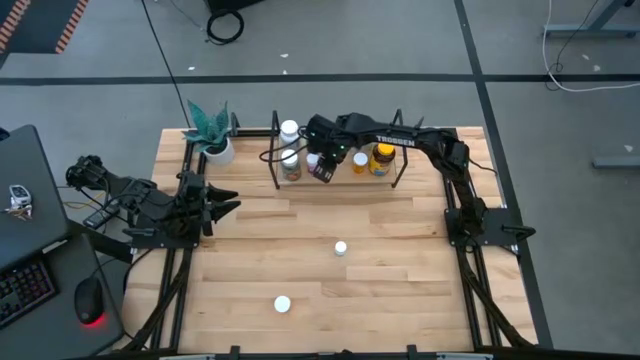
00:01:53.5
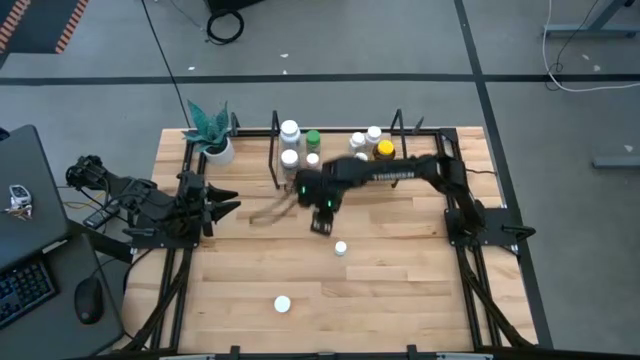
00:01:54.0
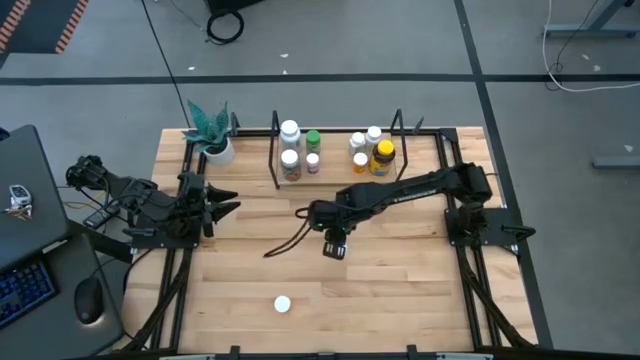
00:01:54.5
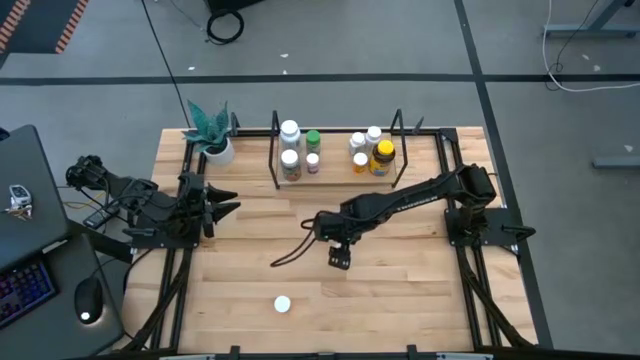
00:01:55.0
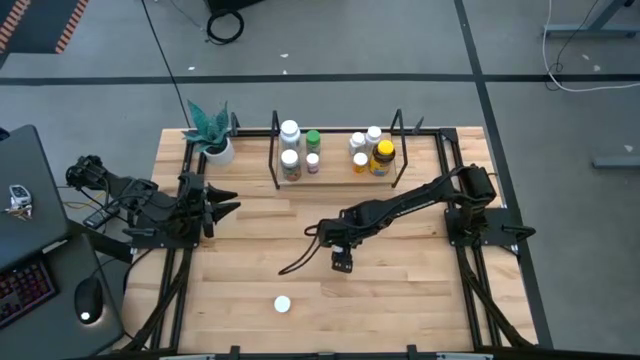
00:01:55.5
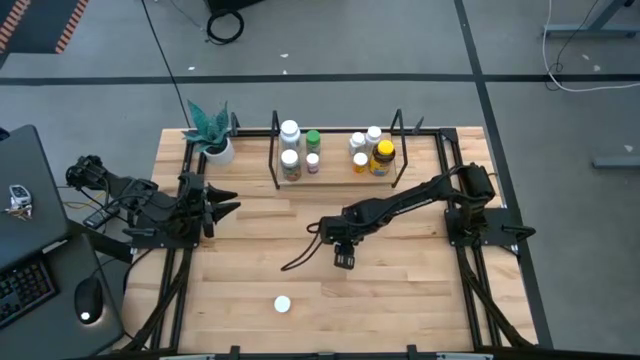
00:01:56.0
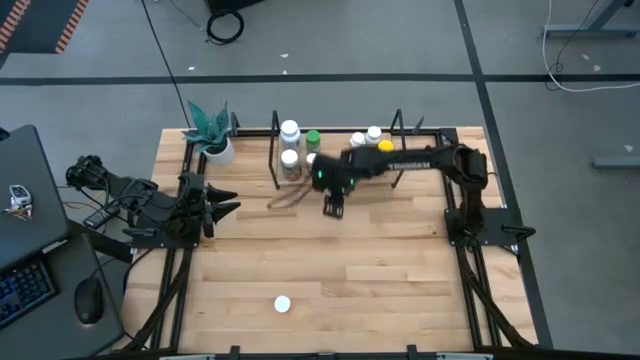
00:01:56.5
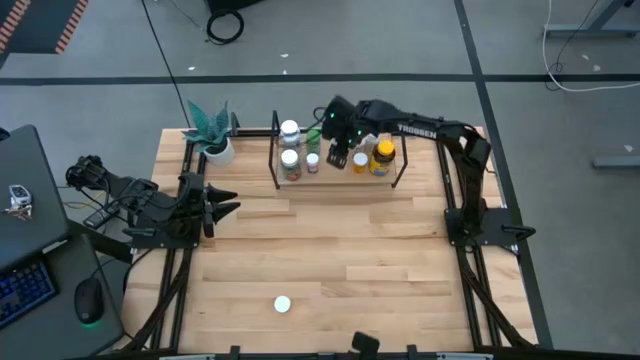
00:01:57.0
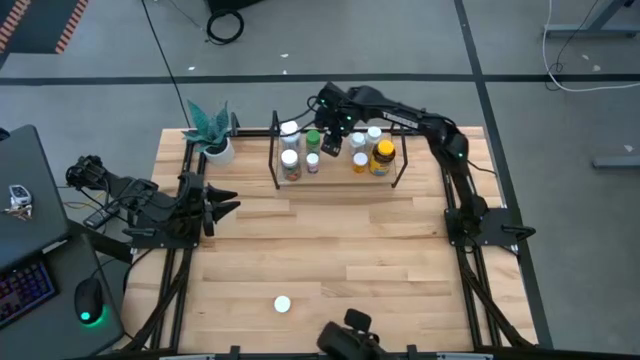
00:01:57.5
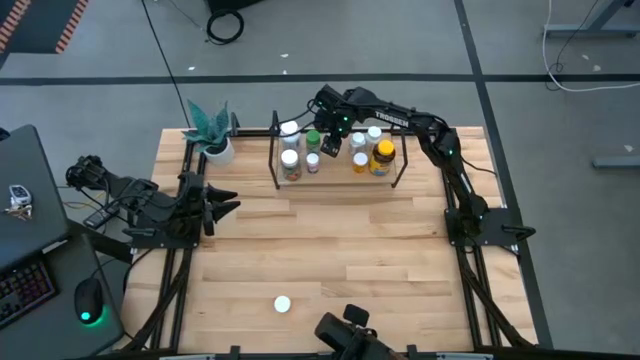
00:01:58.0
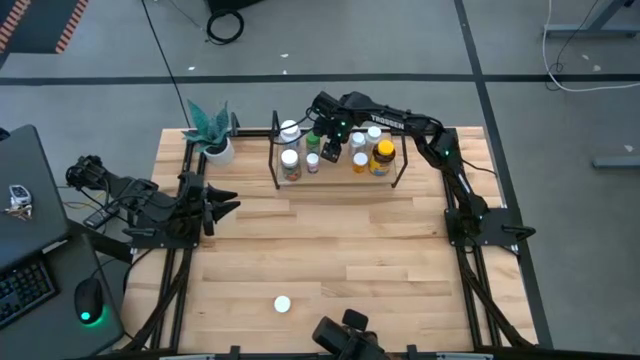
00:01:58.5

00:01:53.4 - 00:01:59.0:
Task: Pick and place medicine bottles onto shelf by color
Put the small white pill bottle on the shelf

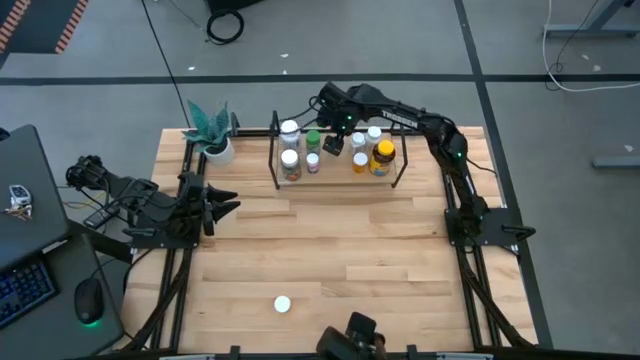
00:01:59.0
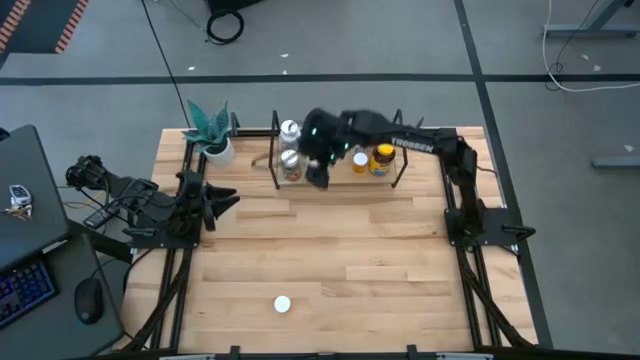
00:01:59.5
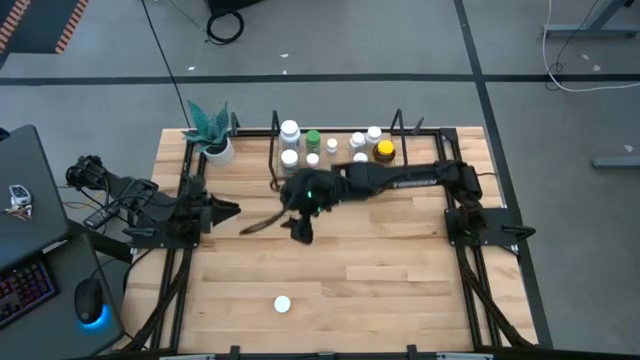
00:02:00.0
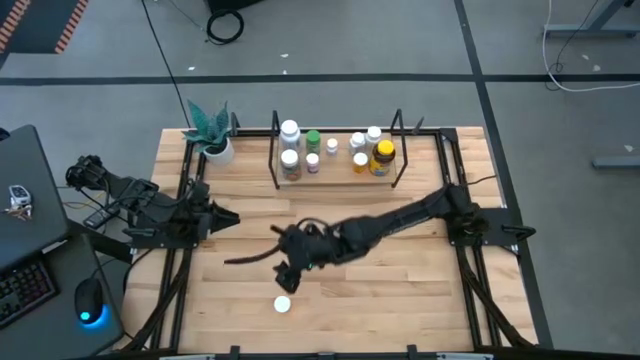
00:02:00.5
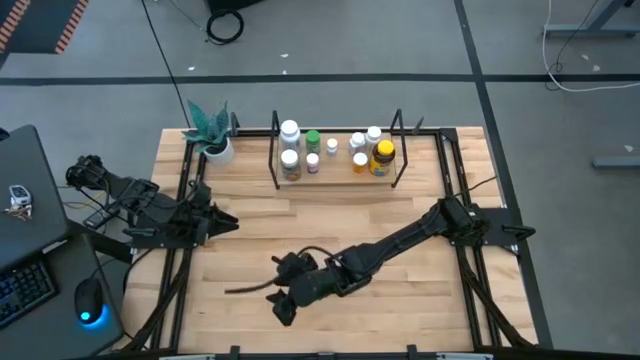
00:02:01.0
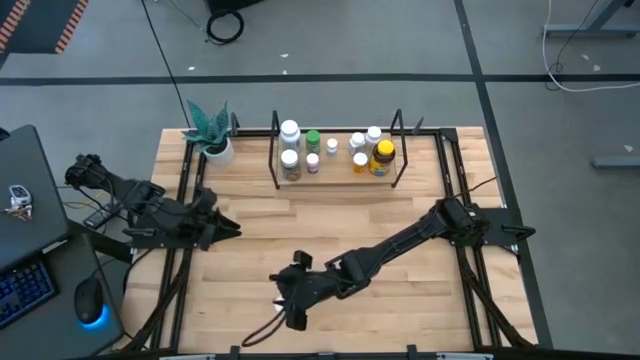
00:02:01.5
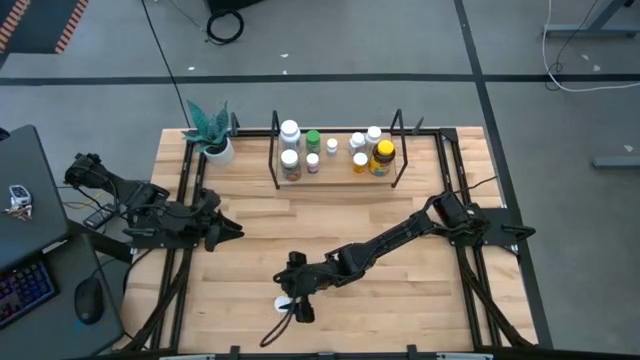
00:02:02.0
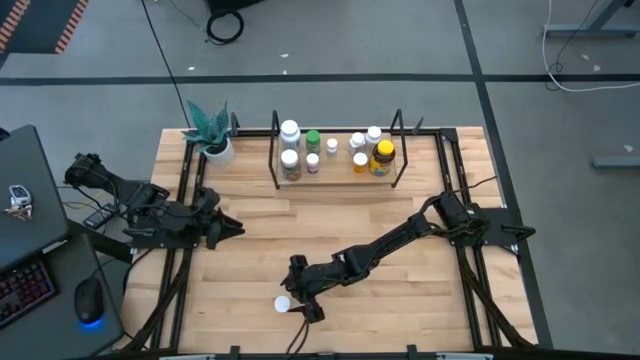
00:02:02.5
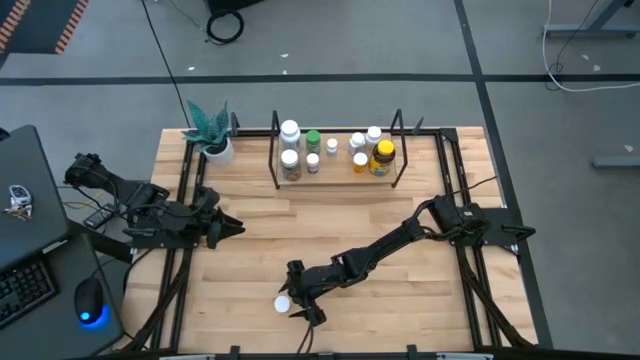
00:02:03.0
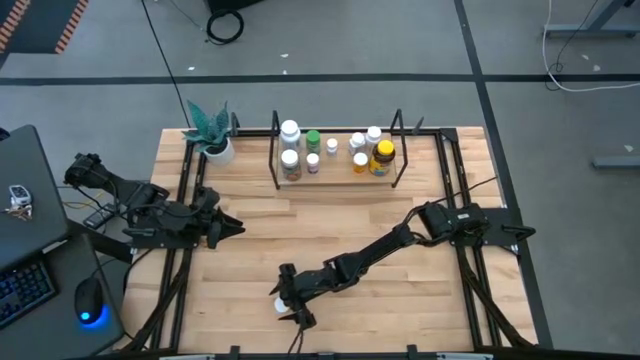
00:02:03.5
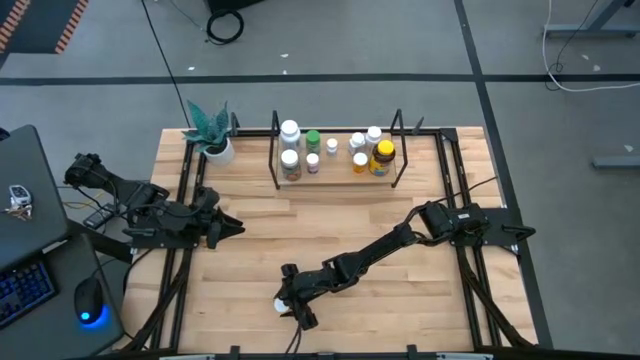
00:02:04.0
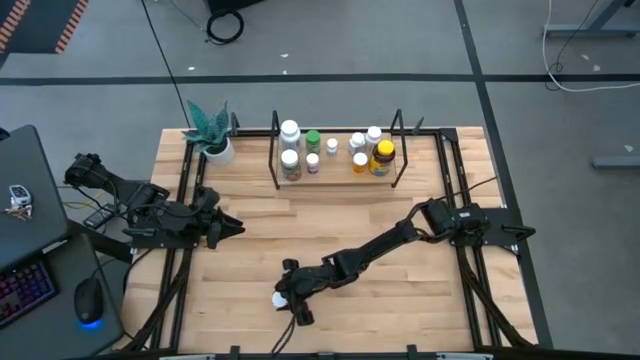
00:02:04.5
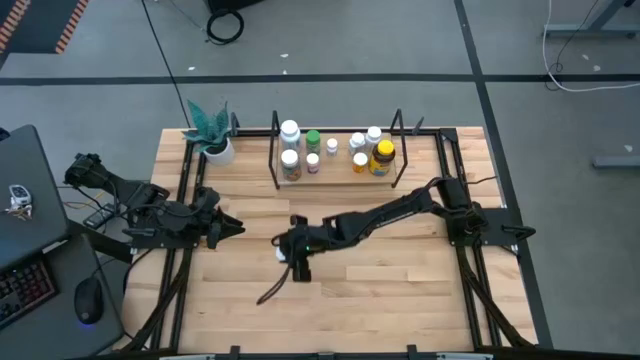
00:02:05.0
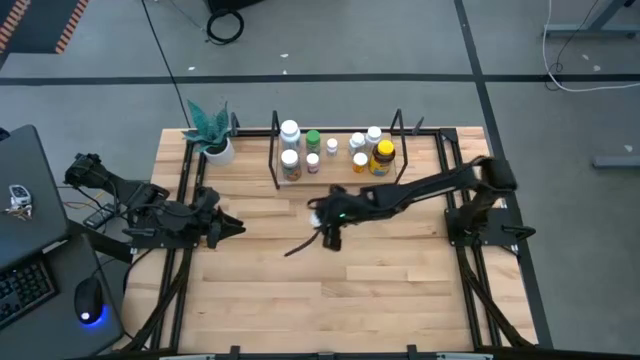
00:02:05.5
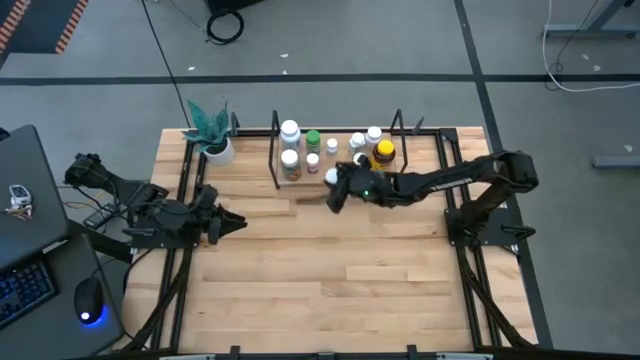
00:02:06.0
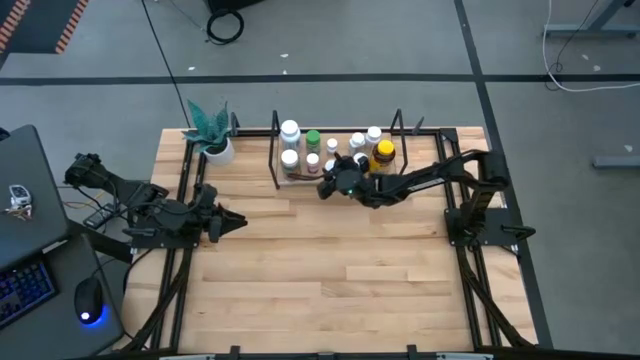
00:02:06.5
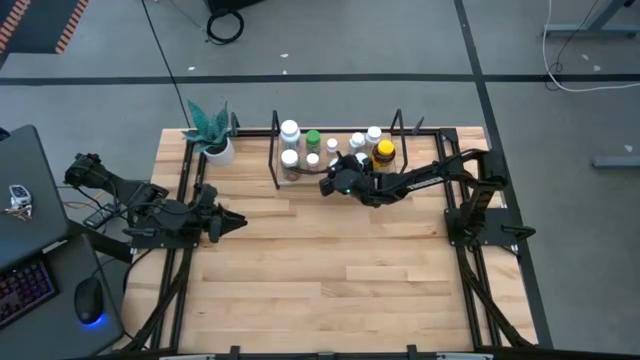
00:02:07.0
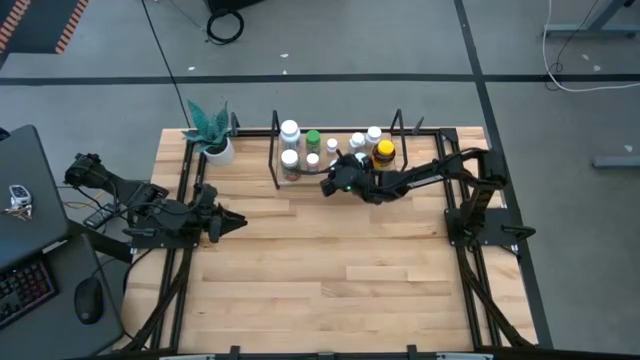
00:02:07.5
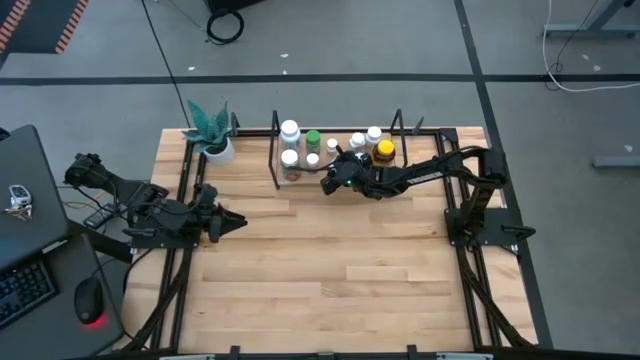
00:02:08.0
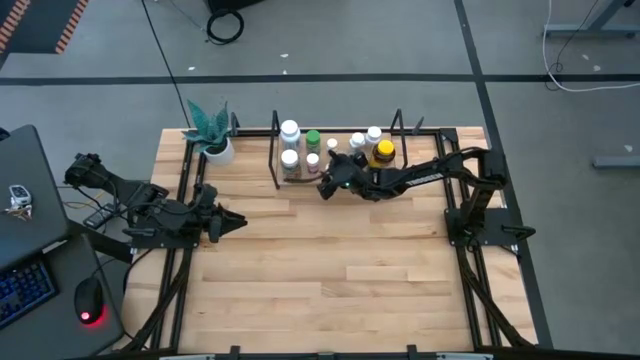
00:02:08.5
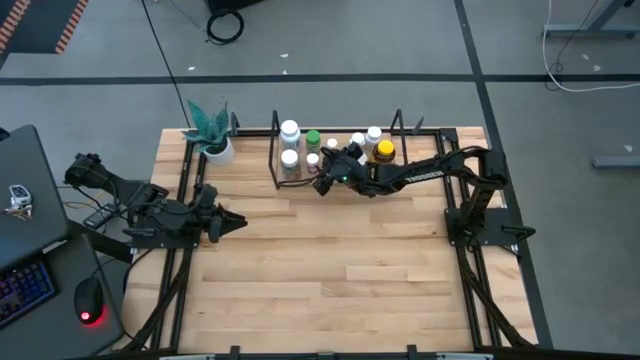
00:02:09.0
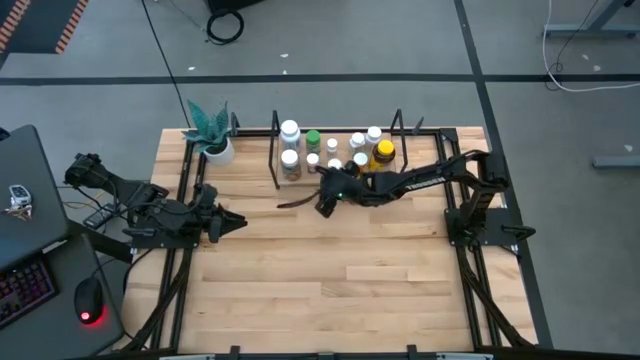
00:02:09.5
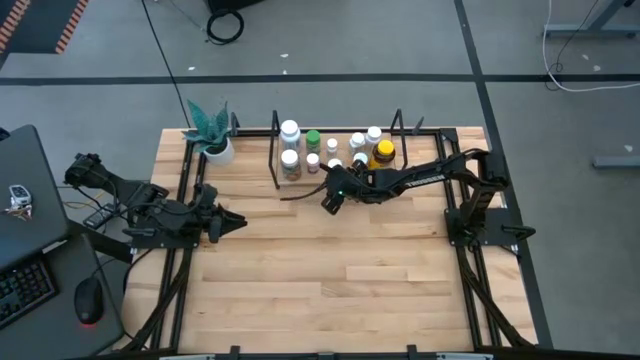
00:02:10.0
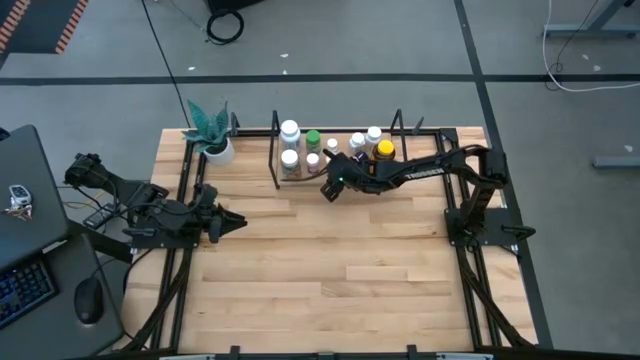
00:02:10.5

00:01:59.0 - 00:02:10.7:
Put the yellow pill bottle on the shelf

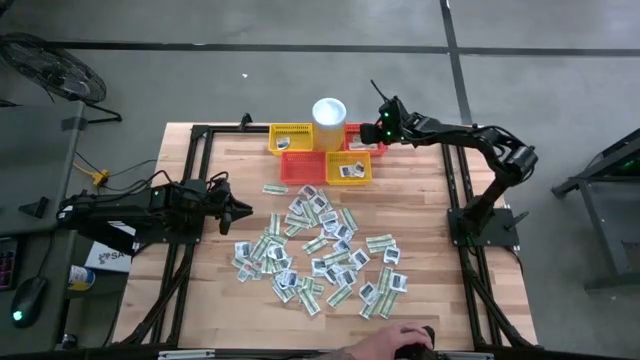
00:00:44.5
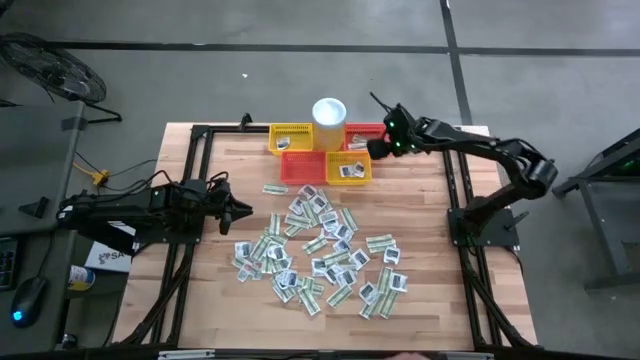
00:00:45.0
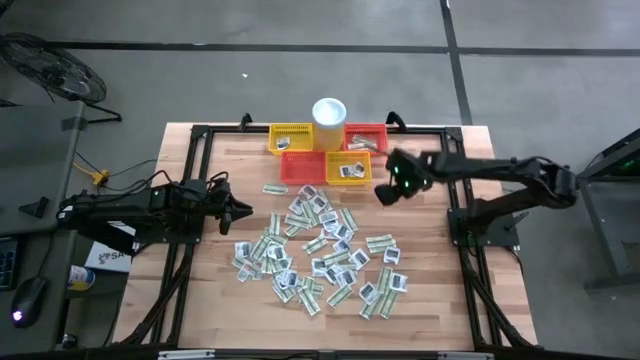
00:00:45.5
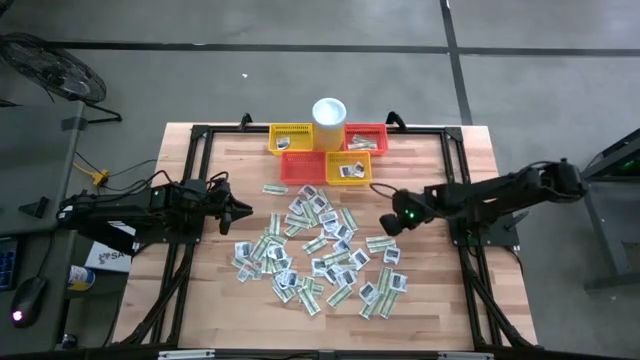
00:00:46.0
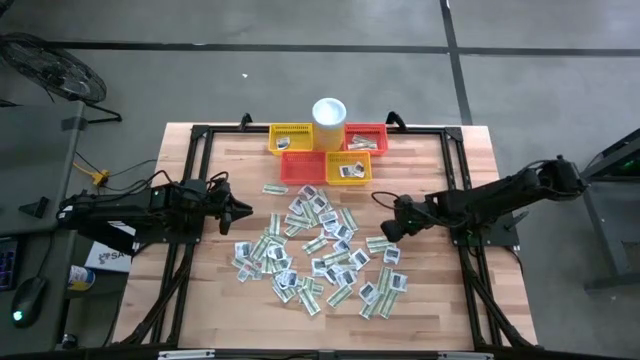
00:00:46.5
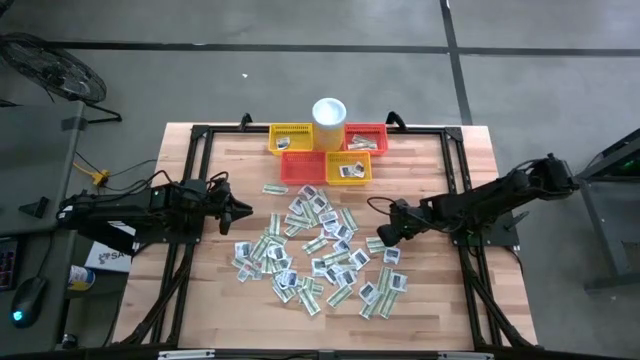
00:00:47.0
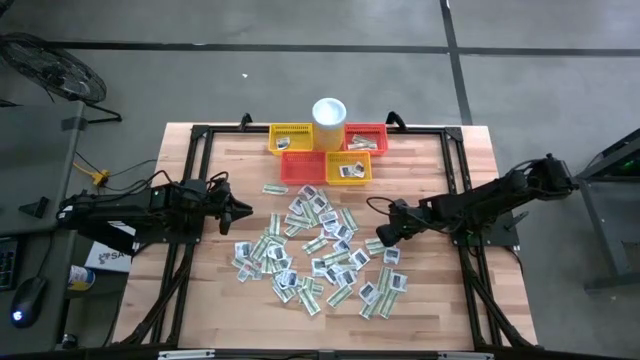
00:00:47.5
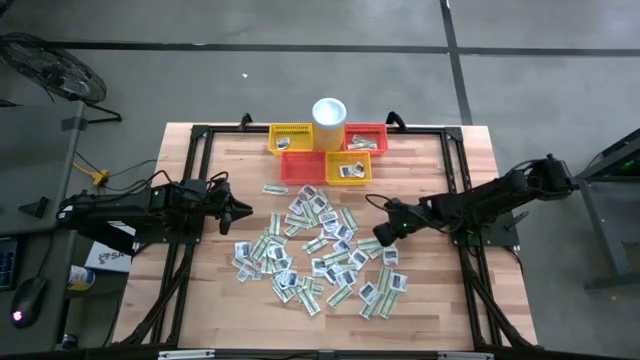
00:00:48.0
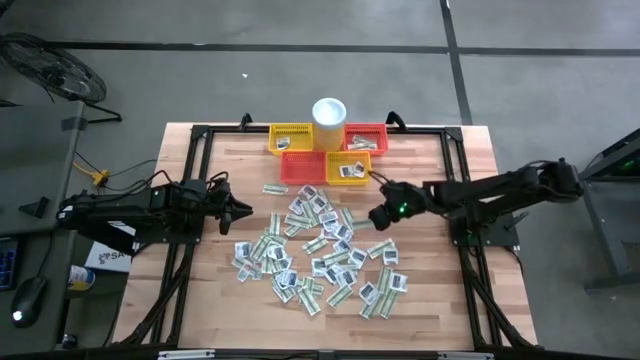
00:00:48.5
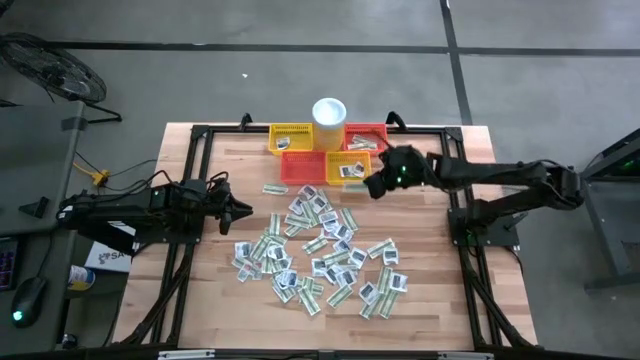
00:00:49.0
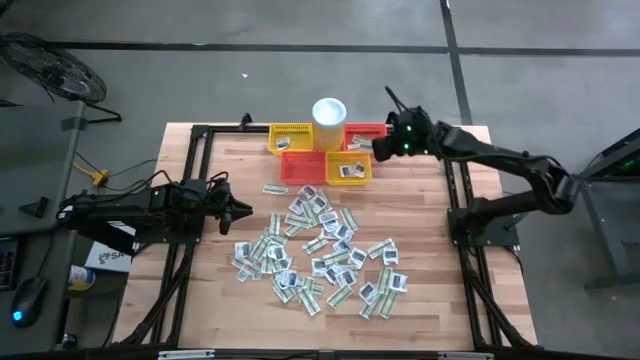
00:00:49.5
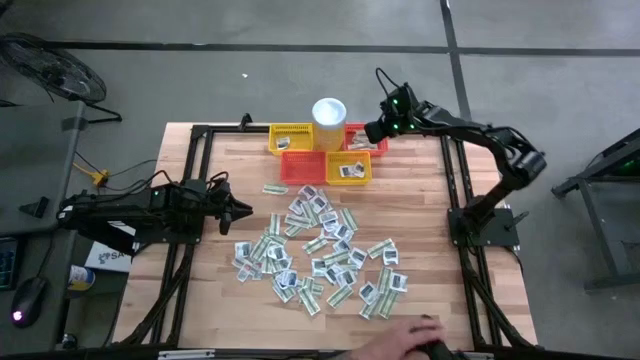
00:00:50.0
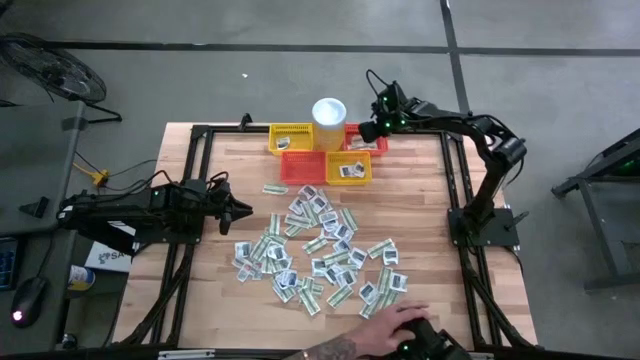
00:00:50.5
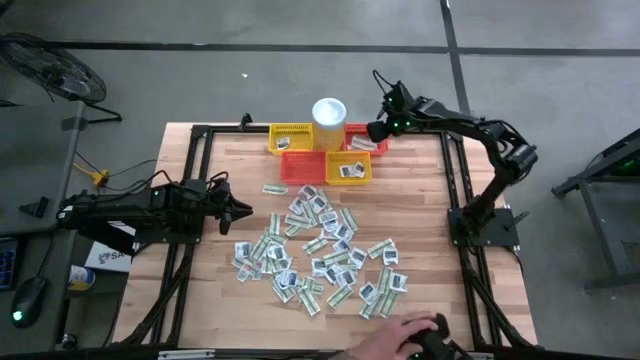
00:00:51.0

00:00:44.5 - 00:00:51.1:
Task: Pick & Place First Aid Supplies
Put the green bandage pack into the top orange basket
